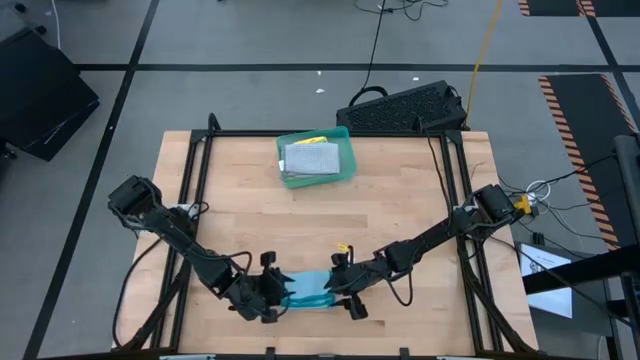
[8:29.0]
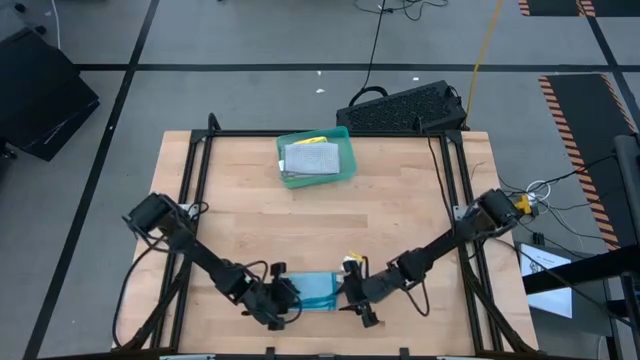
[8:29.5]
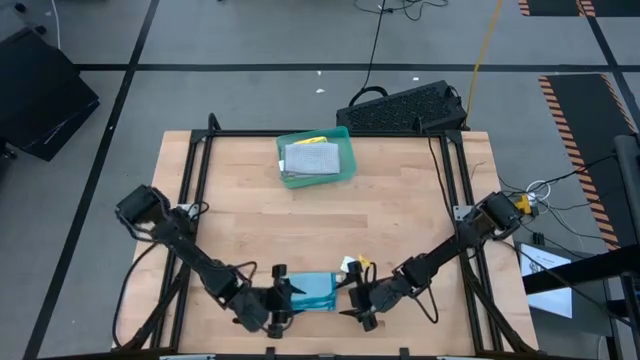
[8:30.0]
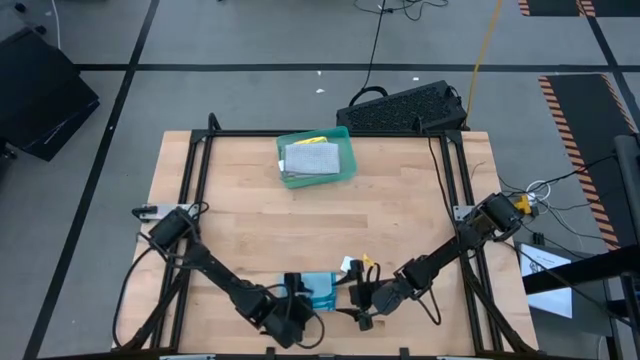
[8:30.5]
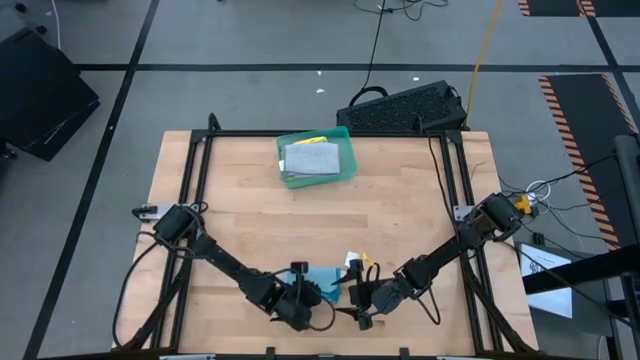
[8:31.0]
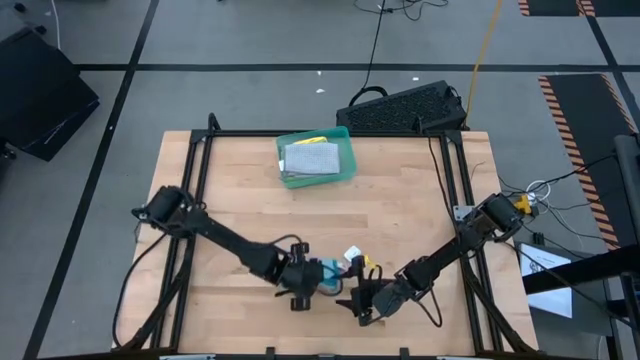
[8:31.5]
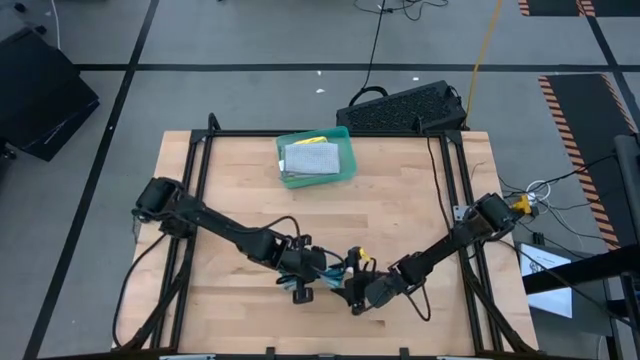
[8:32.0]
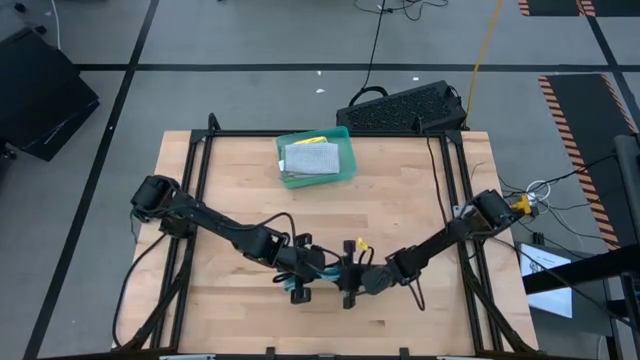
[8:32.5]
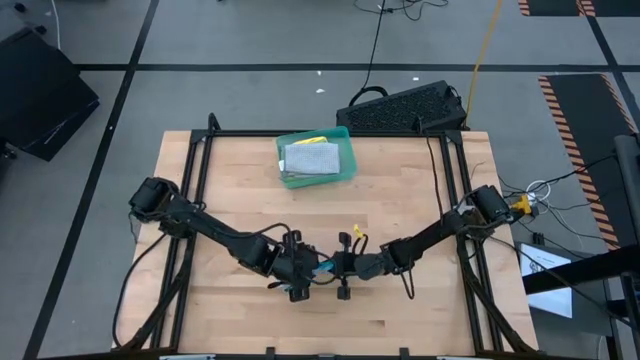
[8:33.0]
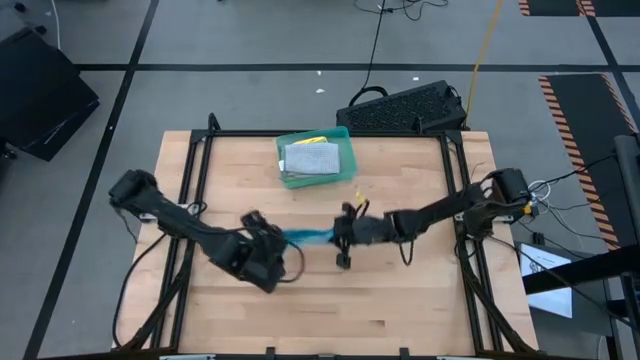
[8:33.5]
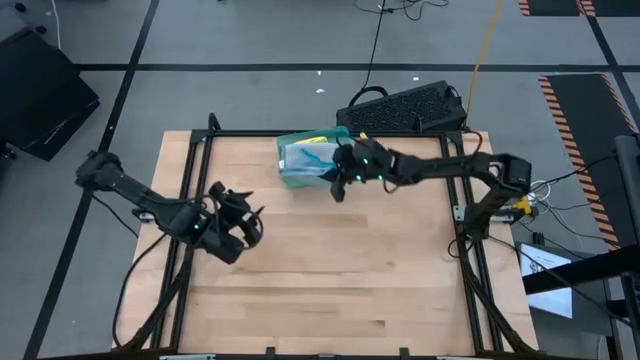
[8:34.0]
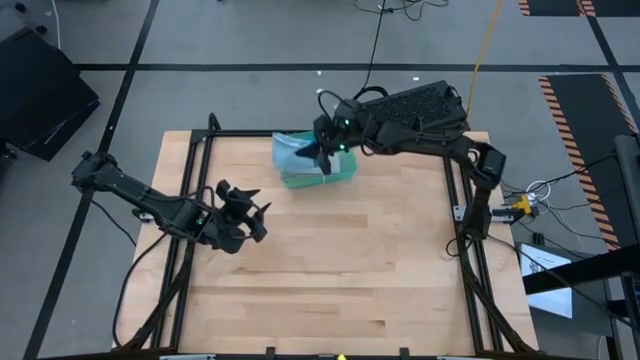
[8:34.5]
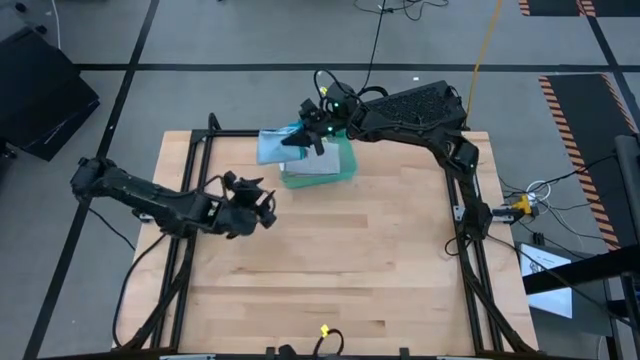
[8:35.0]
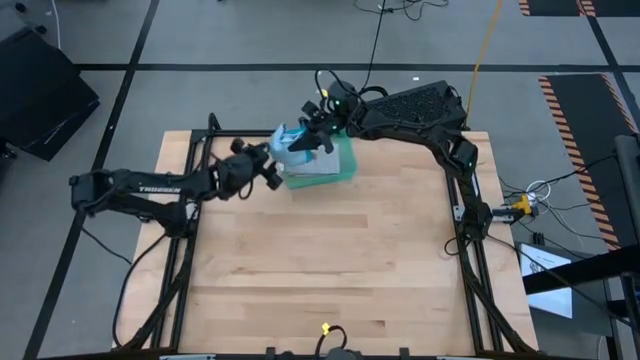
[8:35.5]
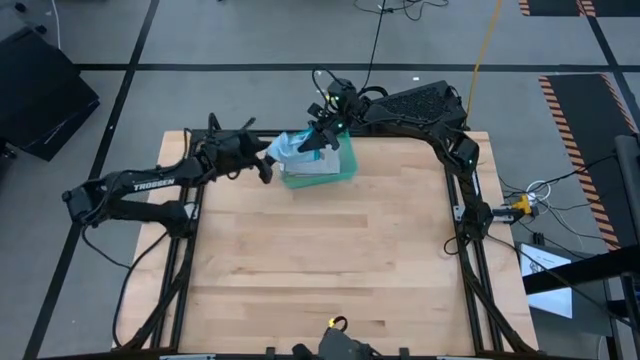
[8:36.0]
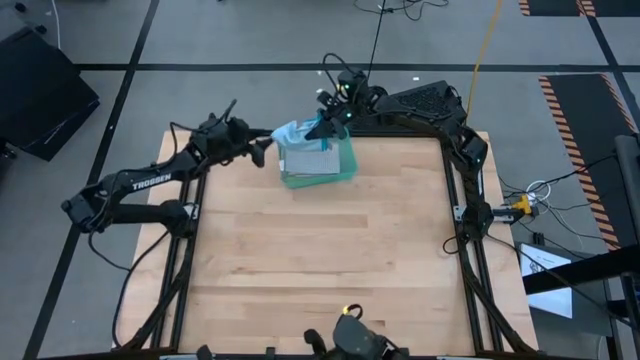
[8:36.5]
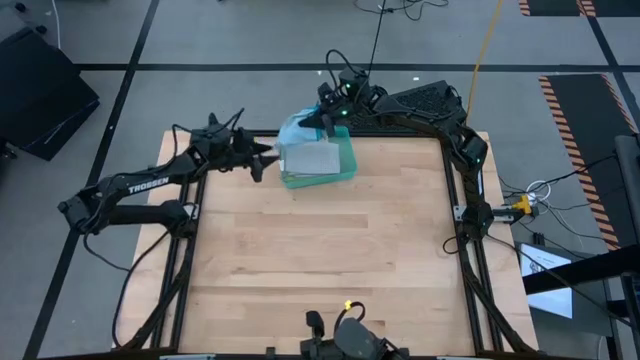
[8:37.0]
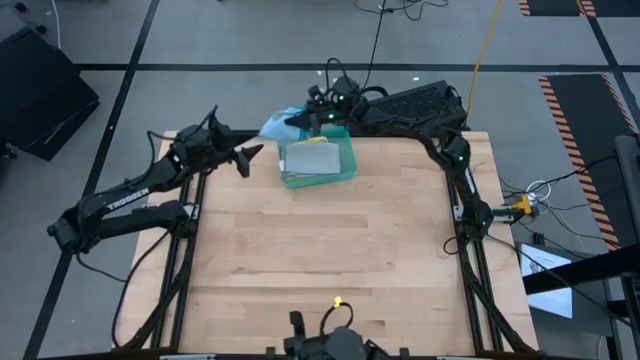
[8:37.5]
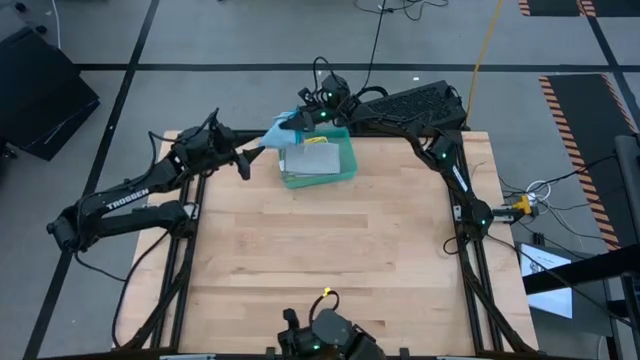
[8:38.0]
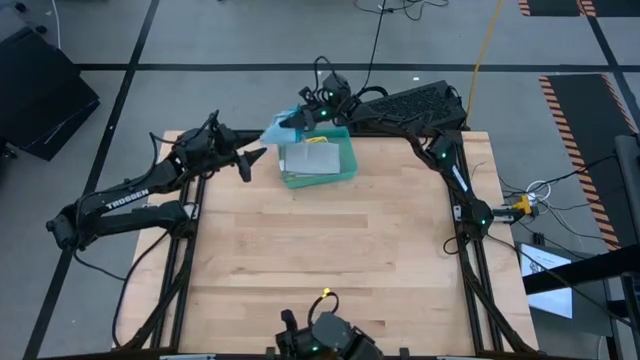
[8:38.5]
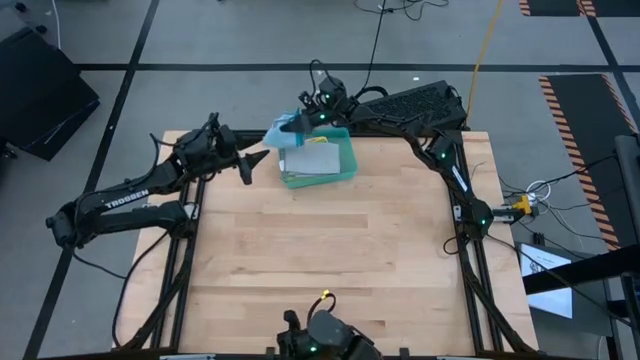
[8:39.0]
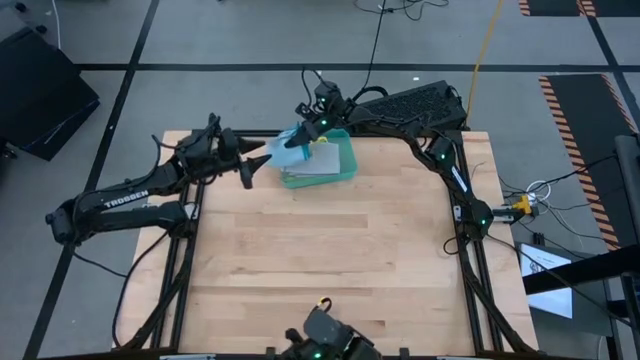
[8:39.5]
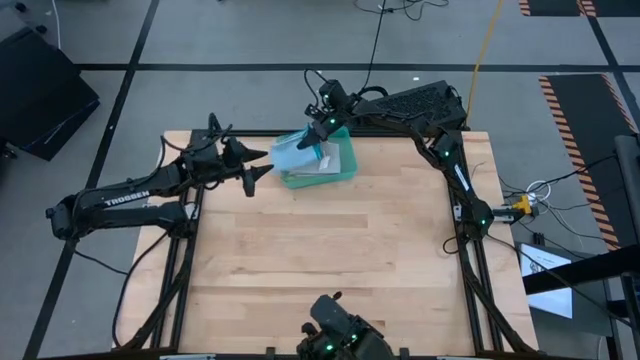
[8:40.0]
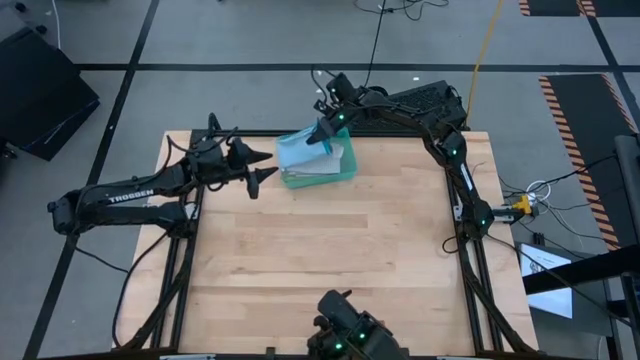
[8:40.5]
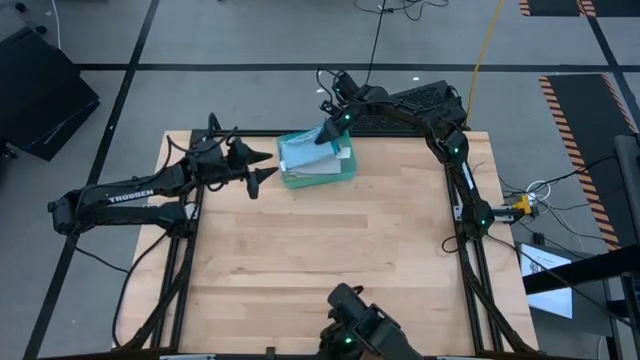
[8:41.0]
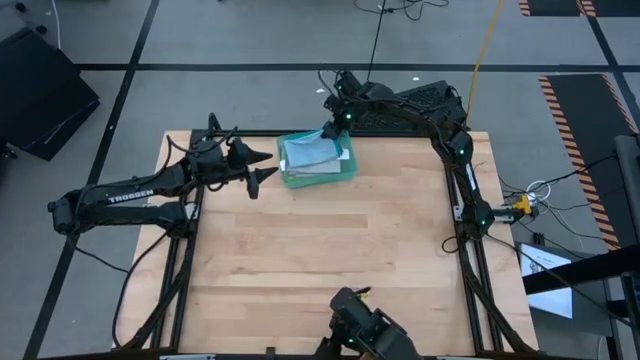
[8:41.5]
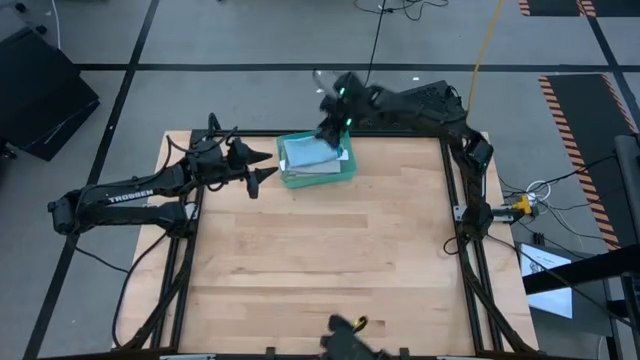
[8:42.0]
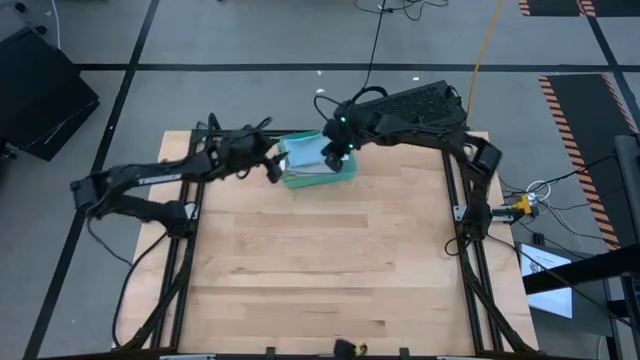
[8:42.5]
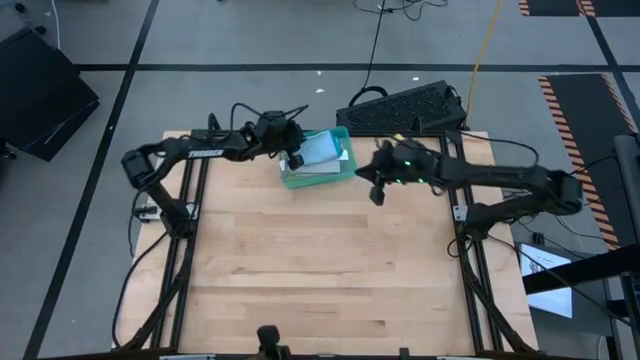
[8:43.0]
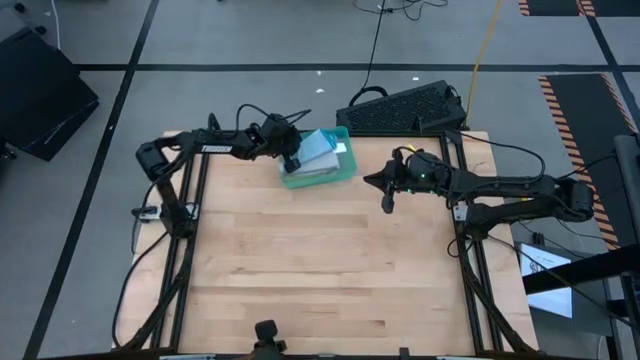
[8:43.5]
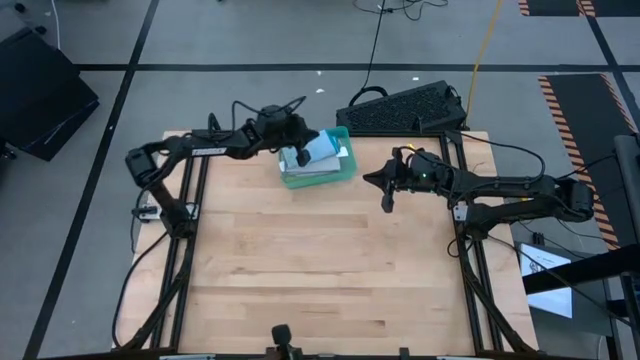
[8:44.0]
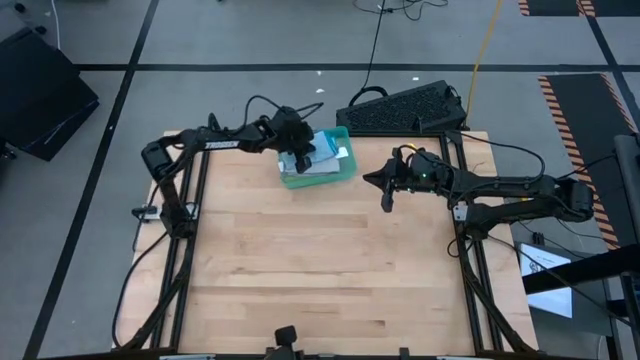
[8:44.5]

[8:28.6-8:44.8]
Task: Fold microfiber towels
Stack the folded blue microfiber cloth on top of the folded gray microfiber cloth into the green bin

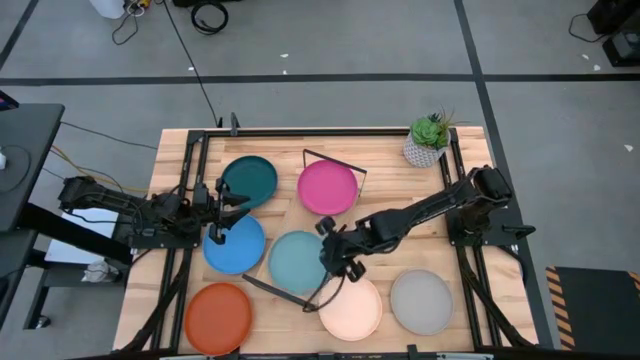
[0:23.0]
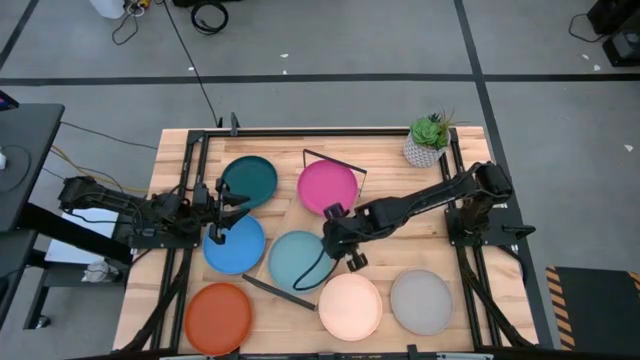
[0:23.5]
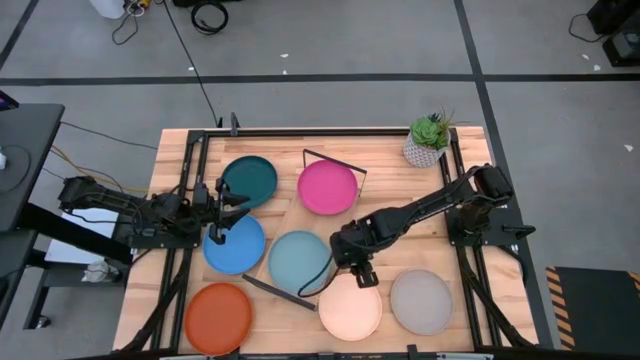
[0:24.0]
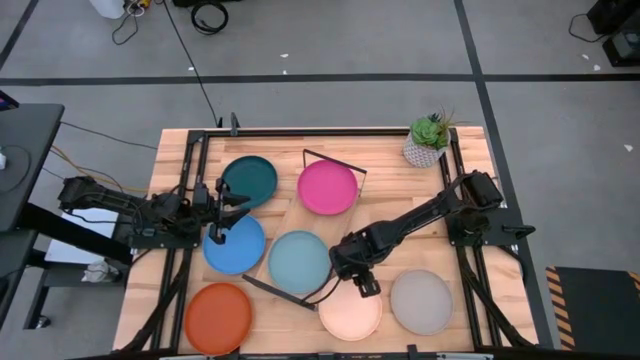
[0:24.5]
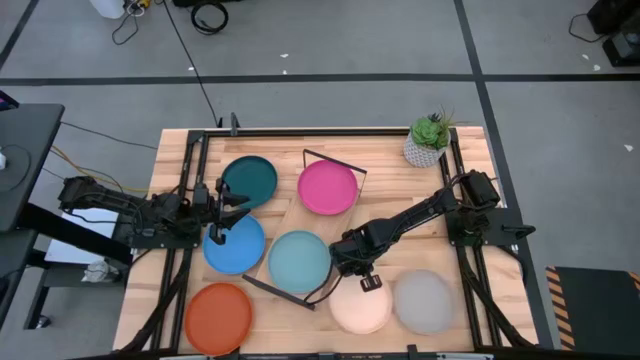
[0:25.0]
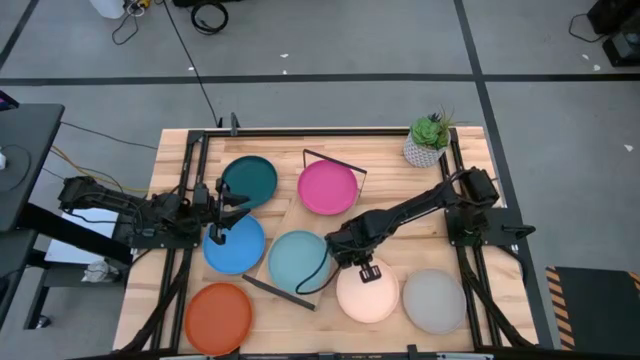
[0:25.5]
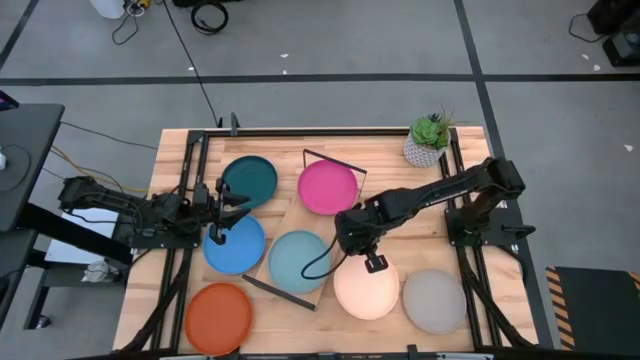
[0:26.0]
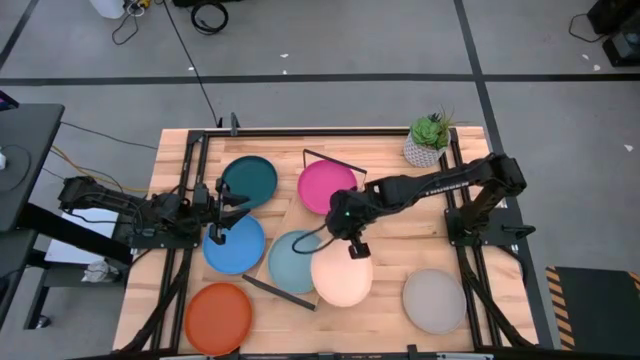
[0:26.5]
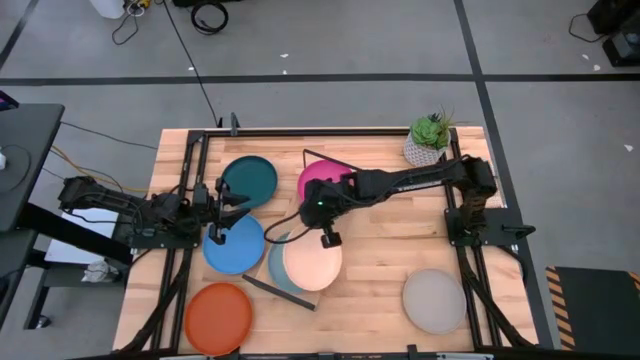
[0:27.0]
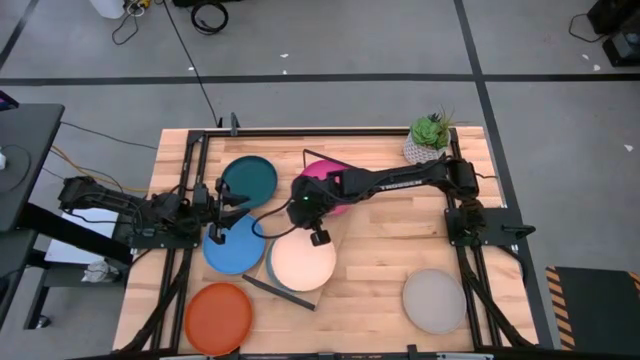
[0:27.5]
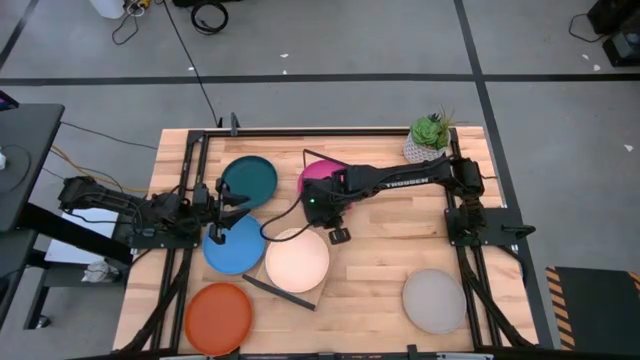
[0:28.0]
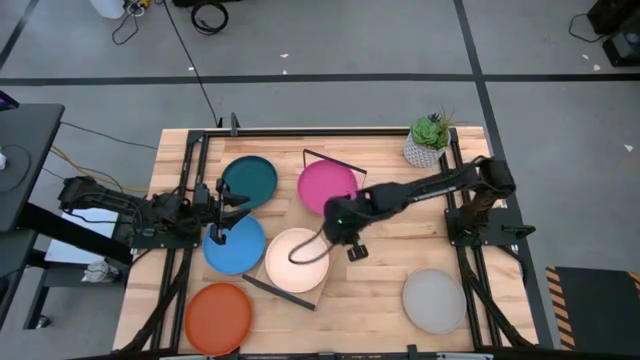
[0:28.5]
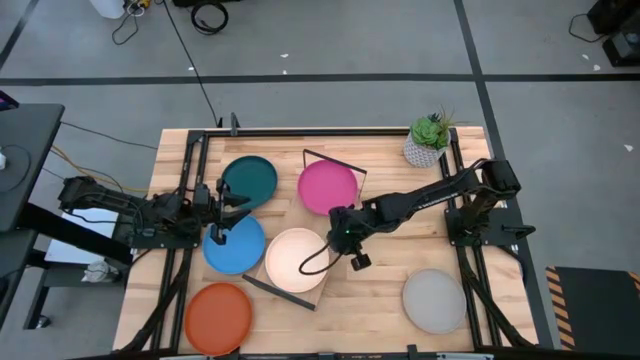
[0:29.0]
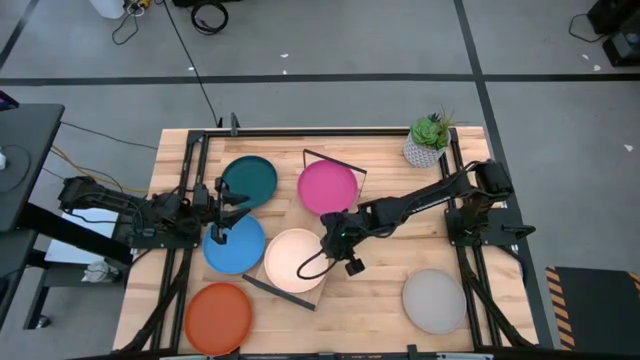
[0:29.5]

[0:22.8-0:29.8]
Task: Place and stack plates onto a shelf
Stack the white plate on top of the light blue plate on the shelf
